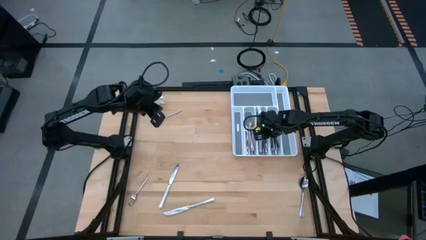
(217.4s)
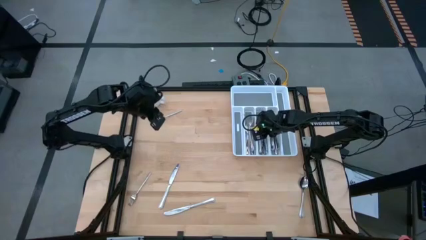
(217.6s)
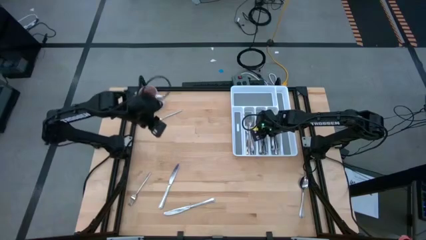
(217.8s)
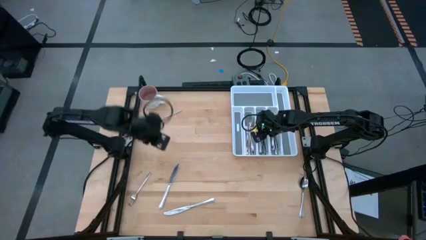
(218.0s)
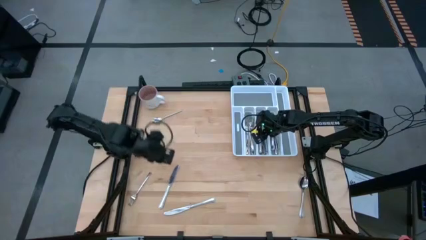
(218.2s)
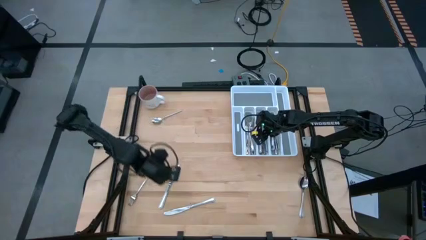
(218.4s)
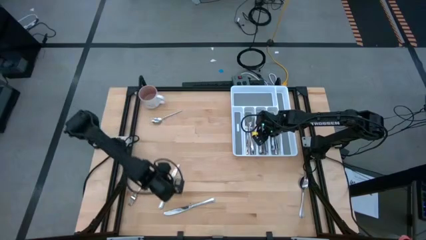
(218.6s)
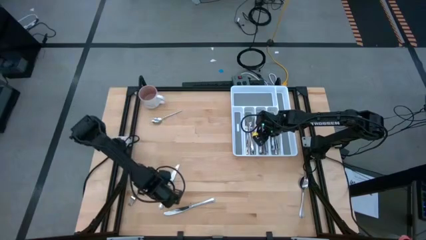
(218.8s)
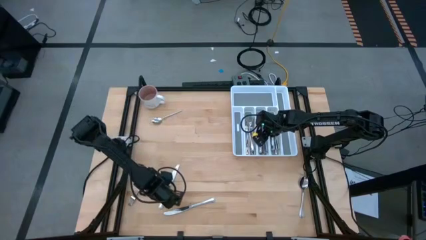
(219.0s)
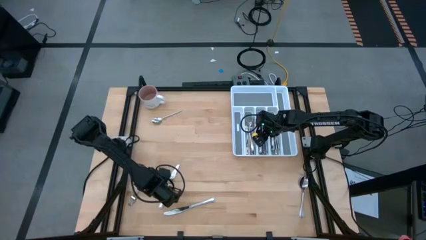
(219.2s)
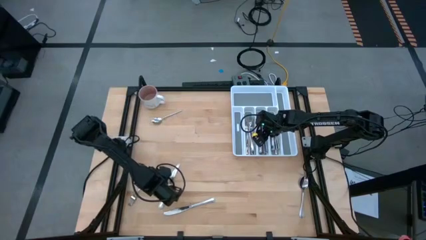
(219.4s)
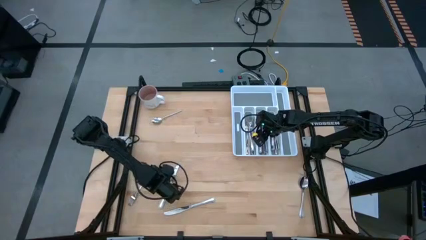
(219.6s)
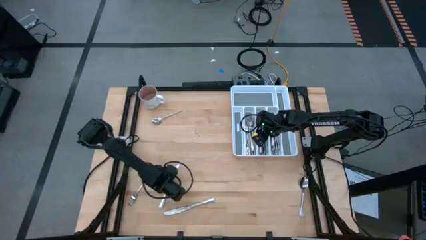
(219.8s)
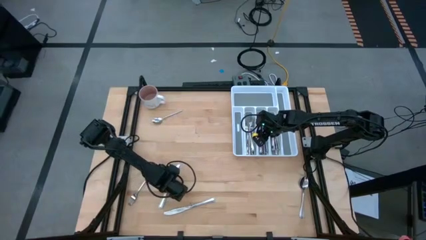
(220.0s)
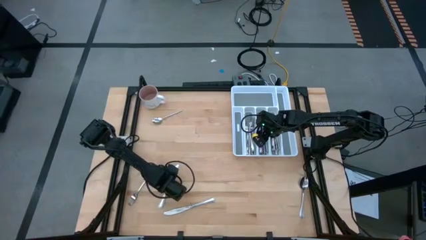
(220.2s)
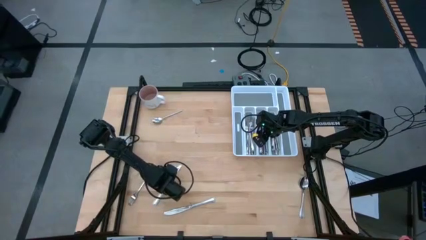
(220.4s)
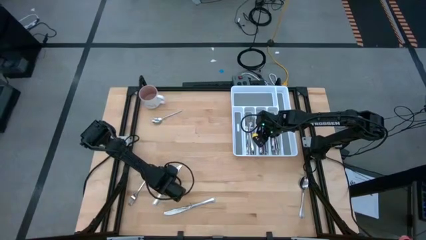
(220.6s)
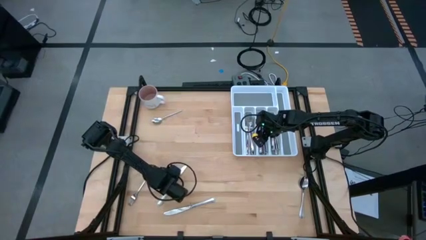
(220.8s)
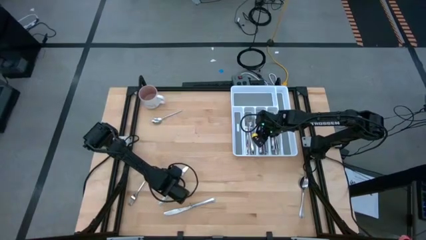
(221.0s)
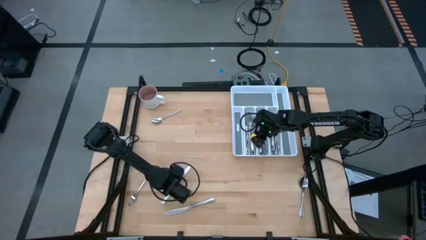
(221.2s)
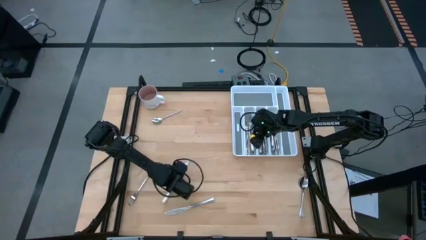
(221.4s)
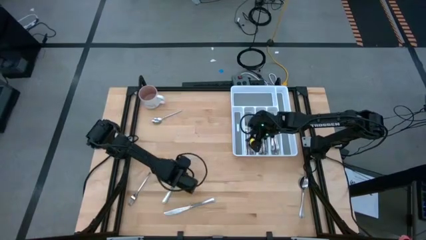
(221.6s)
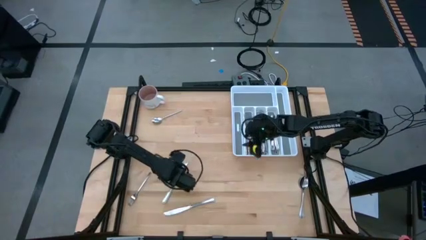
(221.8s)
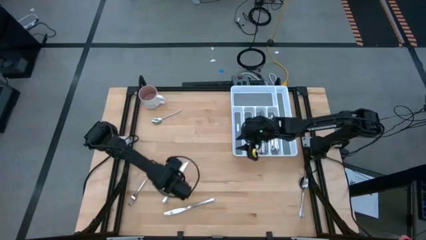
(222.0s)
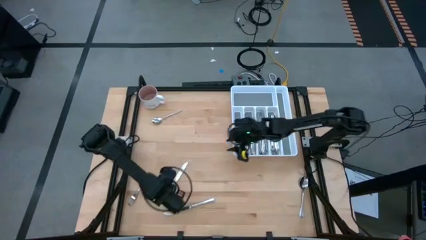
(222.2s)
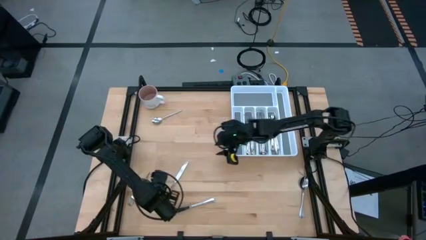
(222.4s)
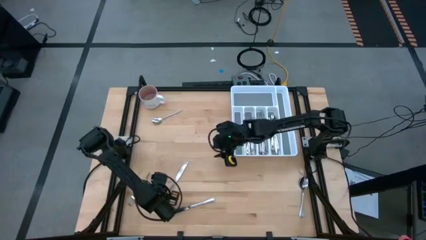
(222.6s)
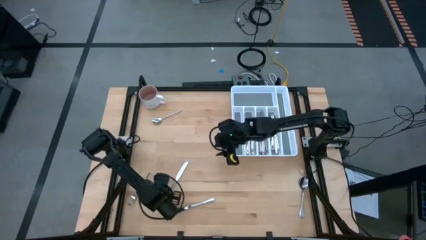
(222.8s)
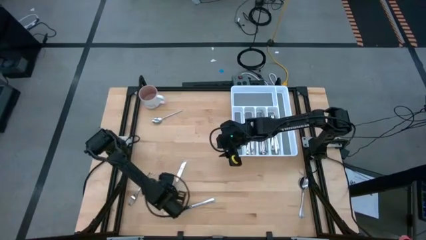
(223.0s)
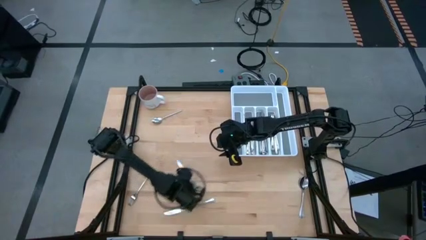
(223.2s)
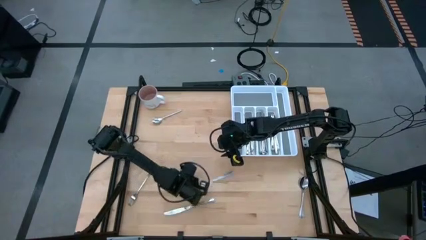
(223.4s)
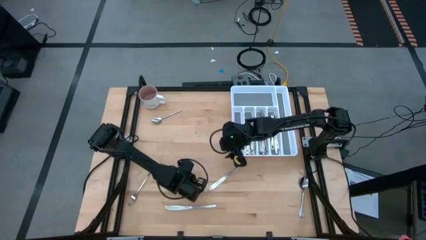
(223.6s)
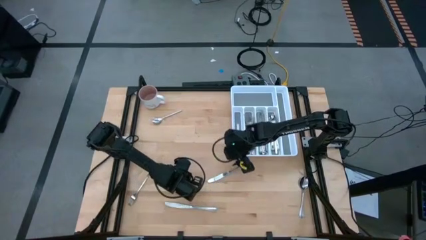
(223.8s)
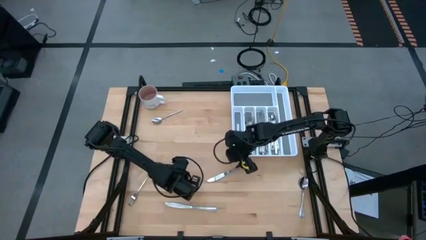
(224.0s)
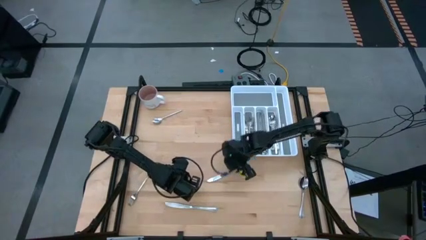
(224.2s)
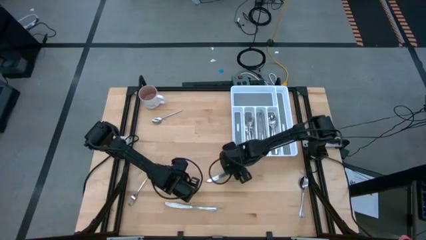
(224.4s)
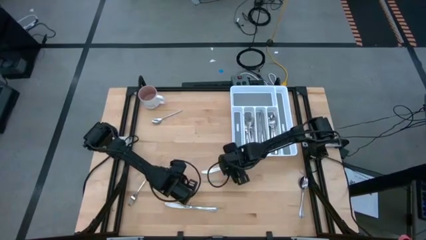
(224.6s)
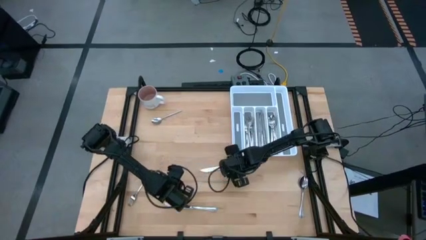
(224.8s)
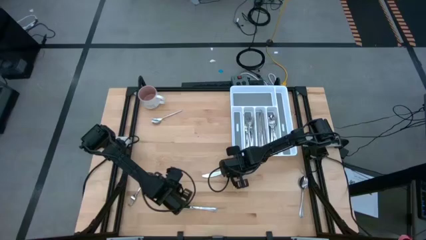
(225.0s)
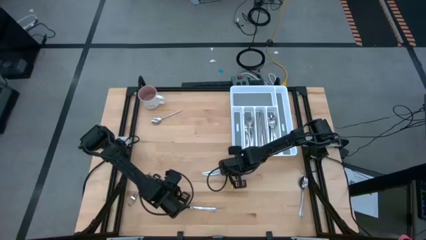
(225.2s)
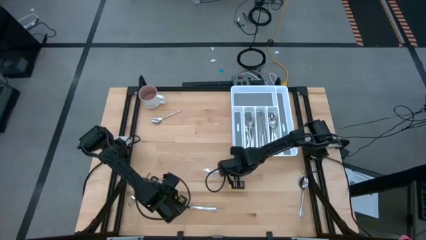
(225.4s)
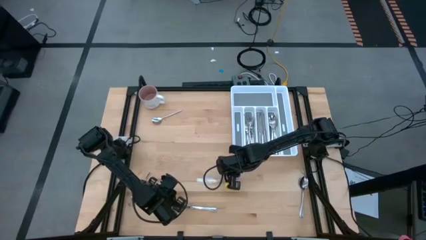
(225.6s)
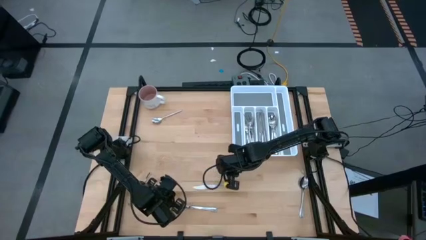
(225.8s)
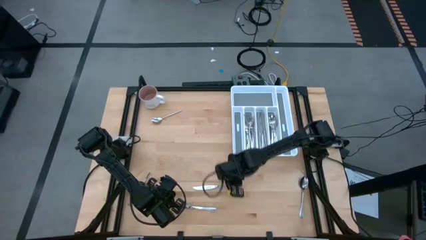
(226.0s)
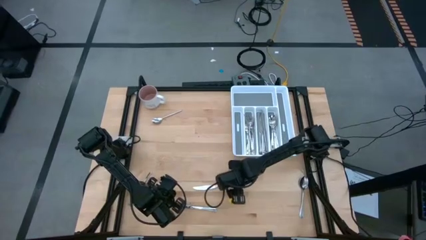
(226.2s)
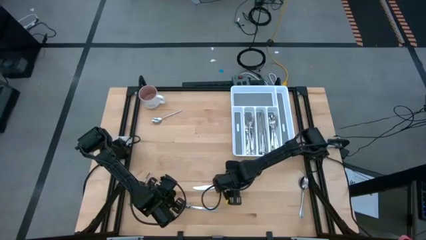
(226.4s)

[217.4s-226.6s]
Task: Sort silverware
Put the silver table knife into the silverware tray

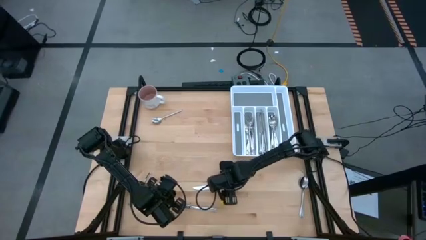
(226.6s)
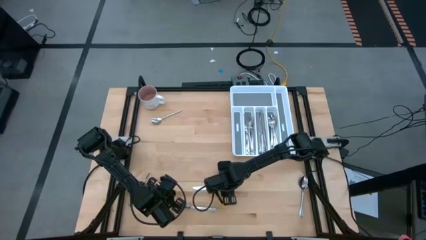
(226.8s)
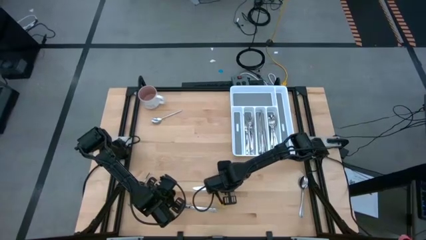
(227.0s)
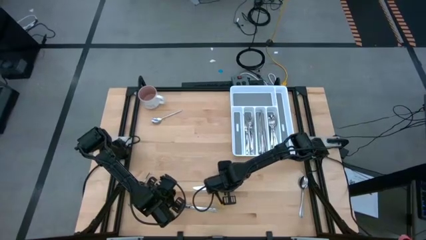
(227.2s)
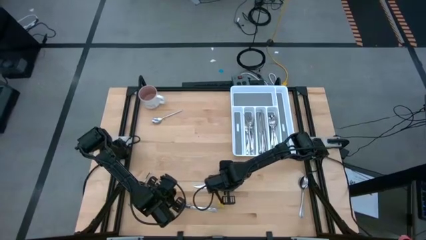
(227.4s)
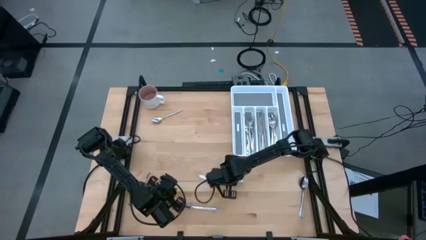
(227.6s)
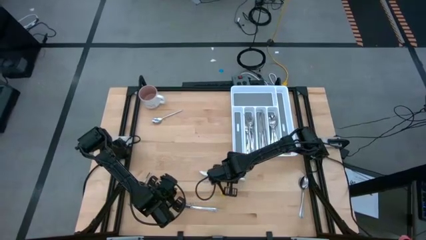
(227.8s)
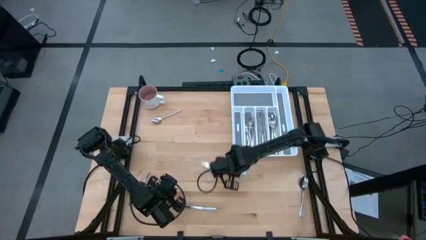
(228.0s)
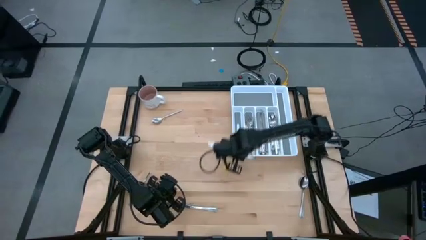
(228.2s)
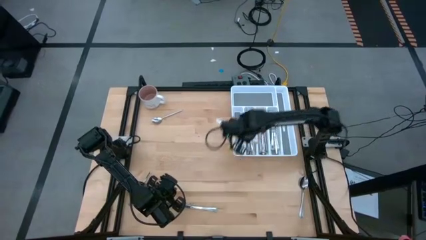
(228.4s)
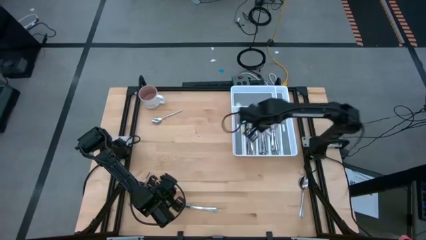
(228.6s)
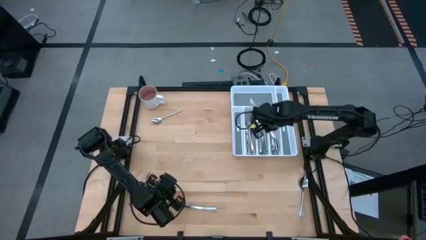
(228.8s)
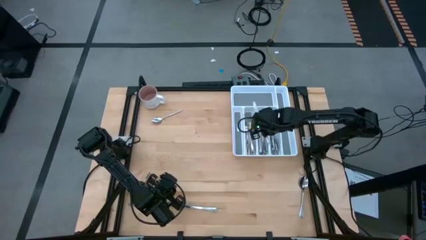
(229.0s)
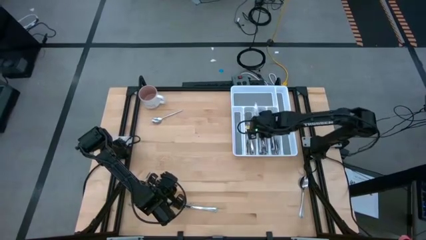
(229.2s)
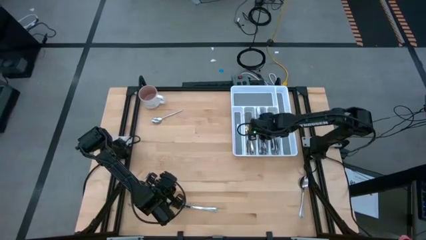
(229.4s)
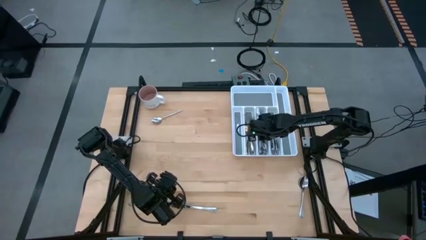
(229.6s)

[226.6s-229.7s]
Put the silver table knife into the silverware tray

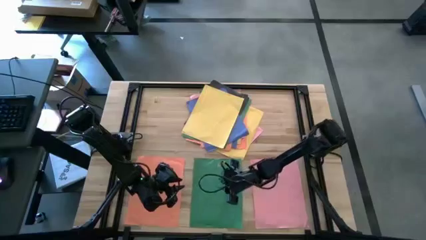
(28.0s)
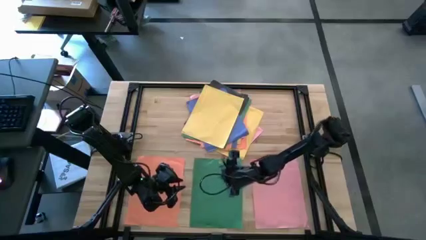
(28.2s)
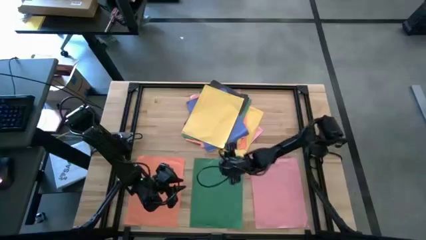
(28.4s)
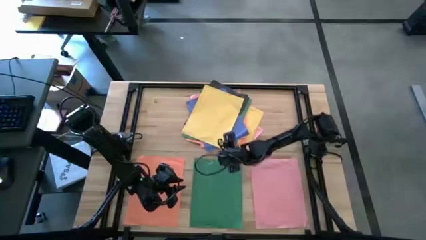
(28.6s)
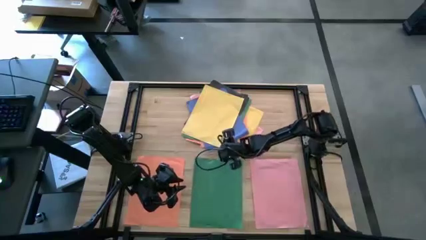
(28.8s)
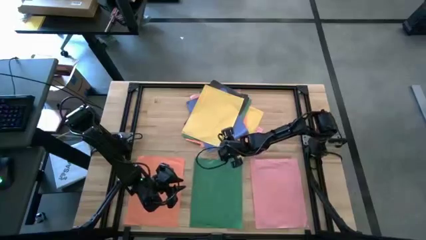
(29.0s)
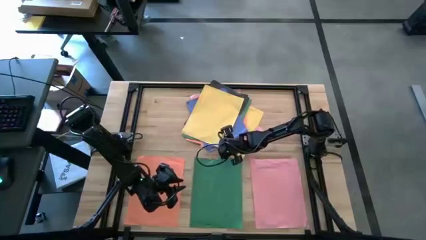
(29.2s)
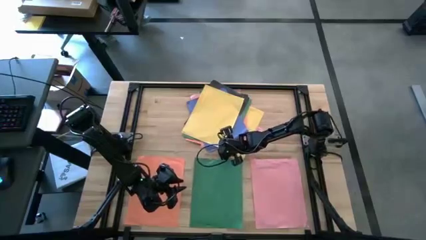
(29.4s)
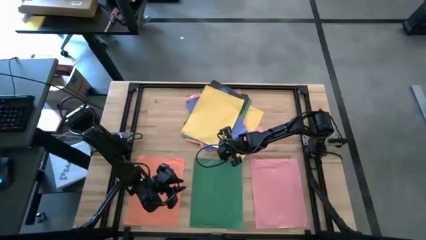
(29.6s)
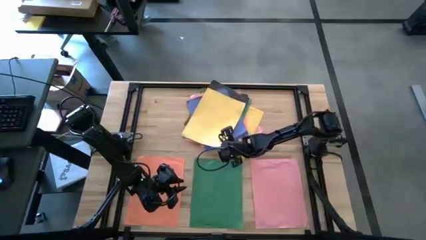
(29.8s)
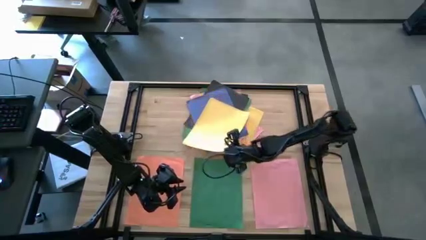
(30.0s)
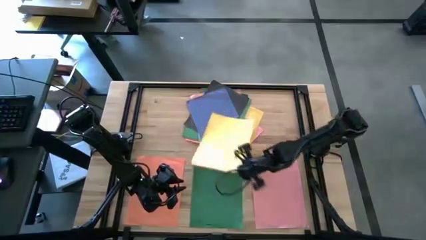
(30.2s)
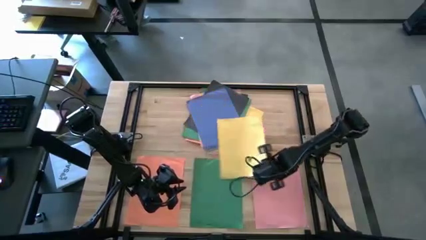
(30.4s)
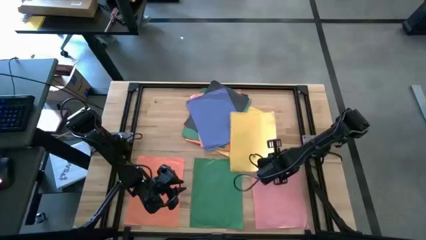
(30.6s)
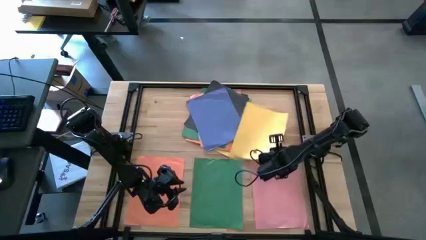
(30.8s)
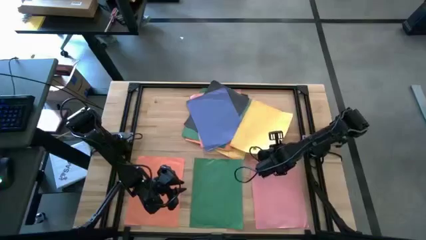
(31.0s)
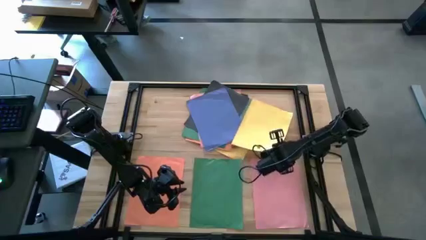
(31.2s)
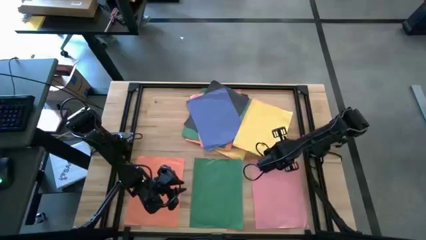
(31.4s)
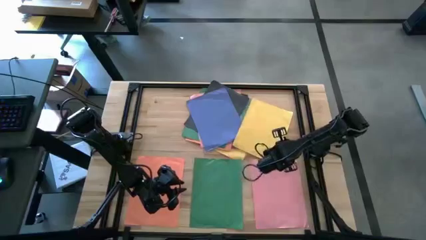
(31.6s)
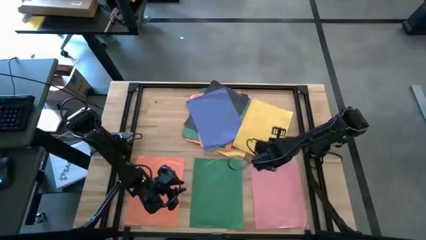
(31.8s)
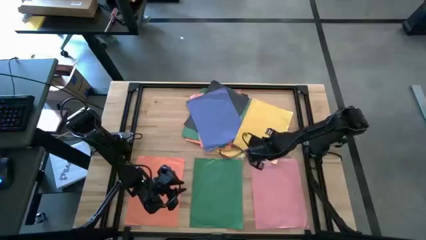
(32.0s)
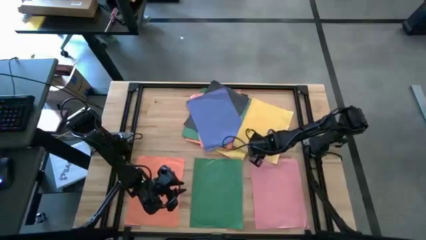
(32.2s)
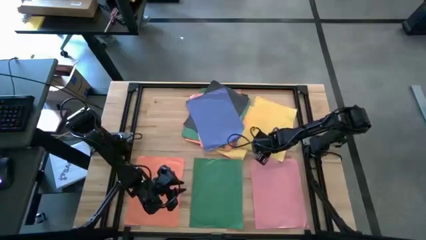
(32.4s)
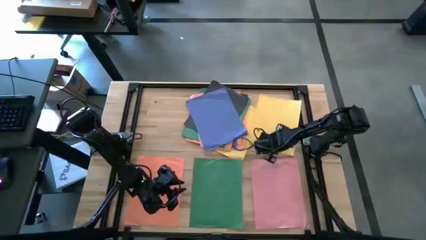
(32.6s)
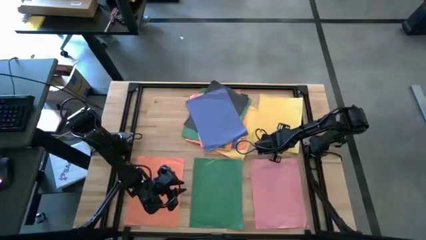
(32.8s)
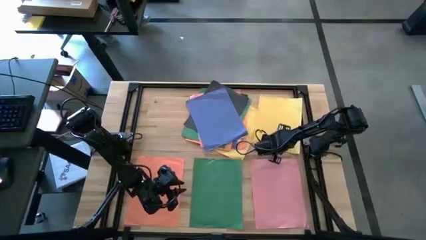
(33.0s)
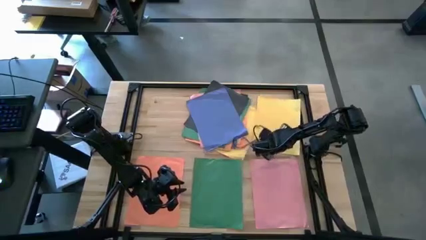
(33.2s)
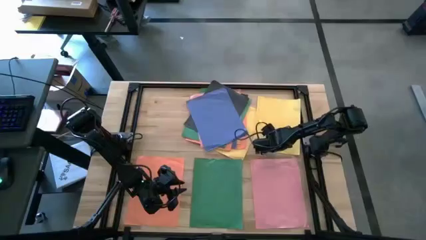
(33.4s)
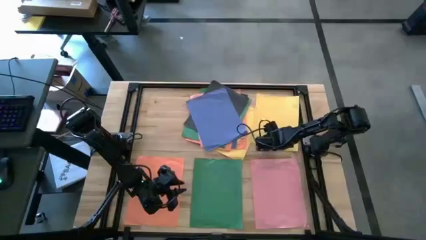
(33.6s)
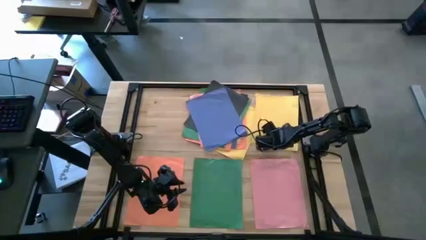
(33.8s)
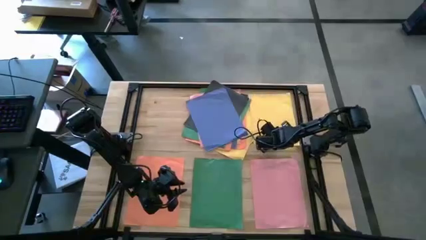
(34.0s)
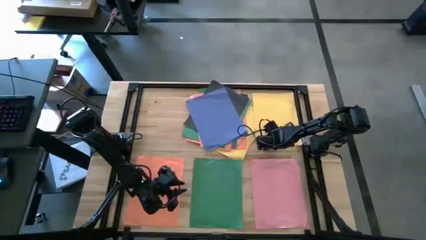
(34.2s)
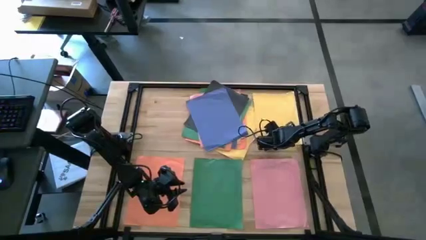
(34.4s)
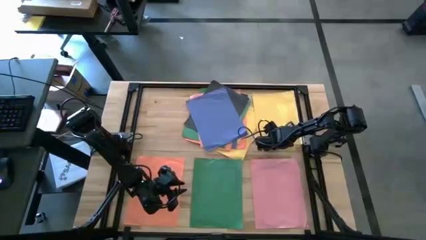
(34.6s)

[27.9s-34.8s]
Task: Organize paper
Move the yellow paper to the upper right of the table
